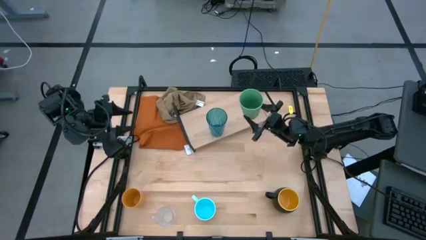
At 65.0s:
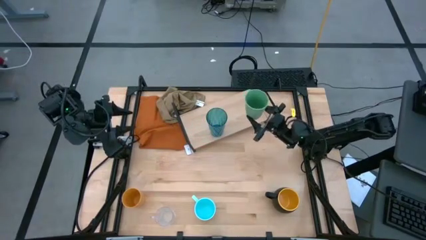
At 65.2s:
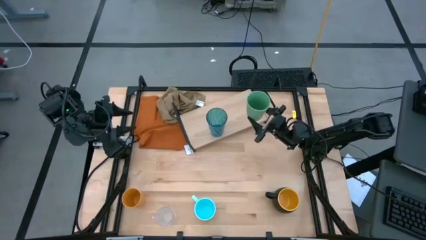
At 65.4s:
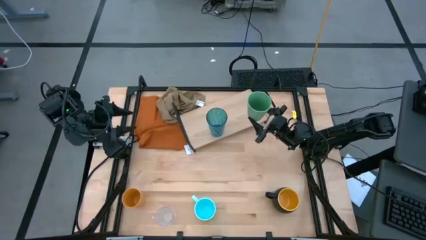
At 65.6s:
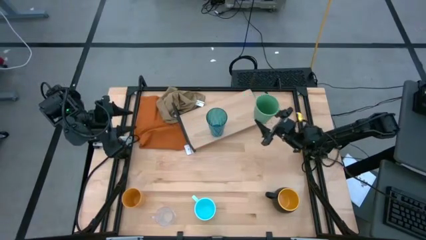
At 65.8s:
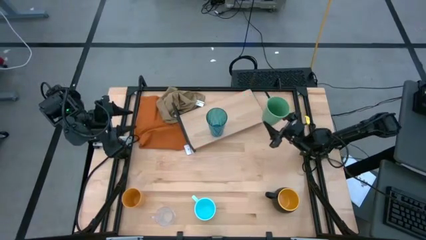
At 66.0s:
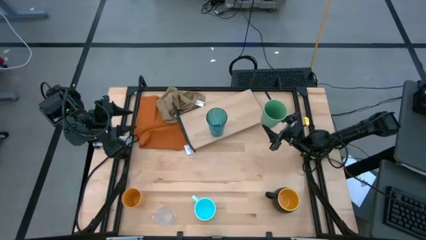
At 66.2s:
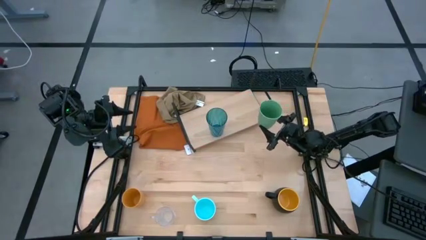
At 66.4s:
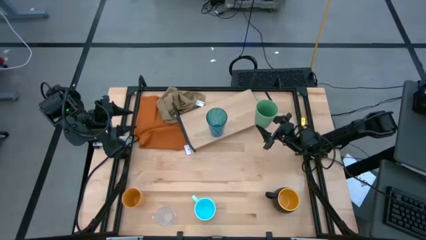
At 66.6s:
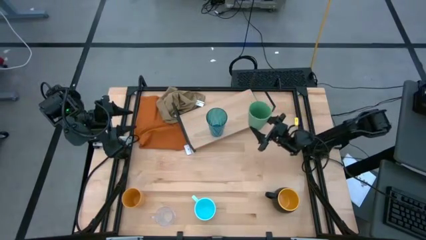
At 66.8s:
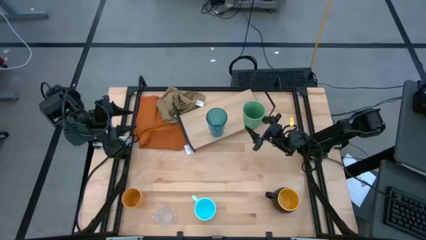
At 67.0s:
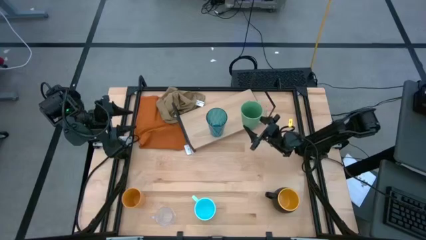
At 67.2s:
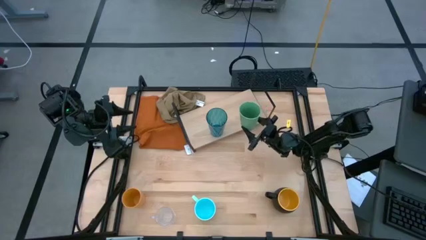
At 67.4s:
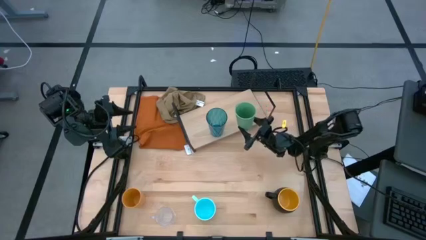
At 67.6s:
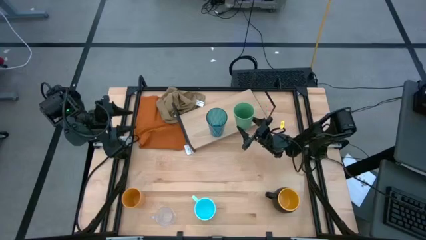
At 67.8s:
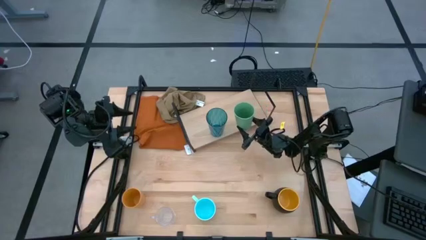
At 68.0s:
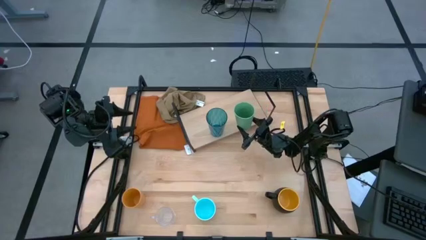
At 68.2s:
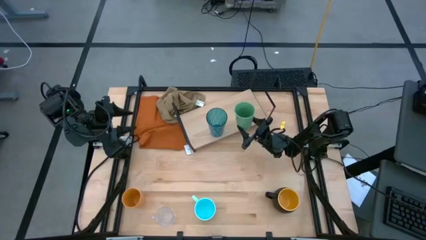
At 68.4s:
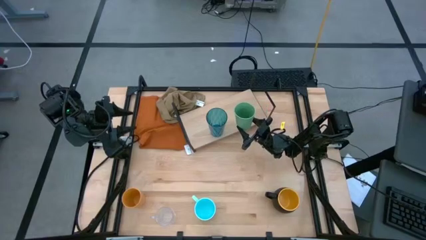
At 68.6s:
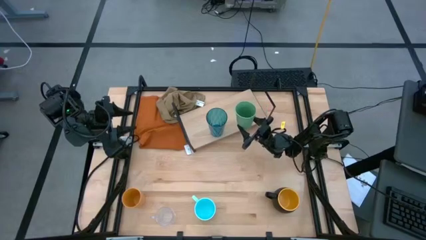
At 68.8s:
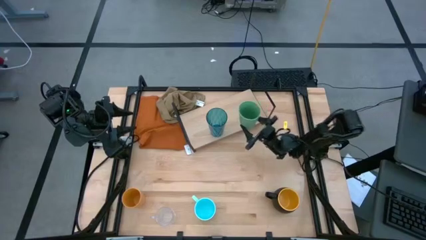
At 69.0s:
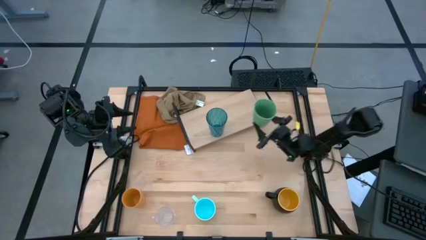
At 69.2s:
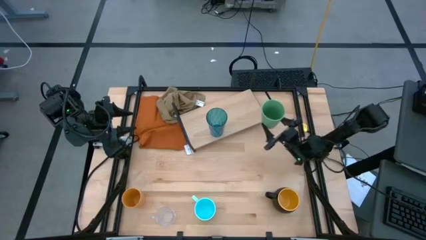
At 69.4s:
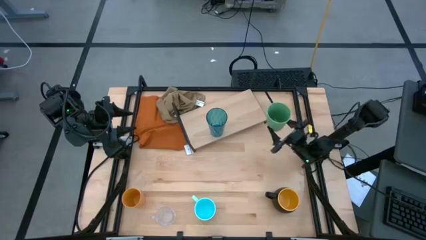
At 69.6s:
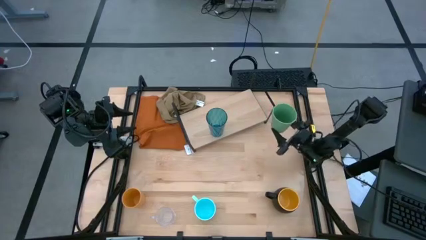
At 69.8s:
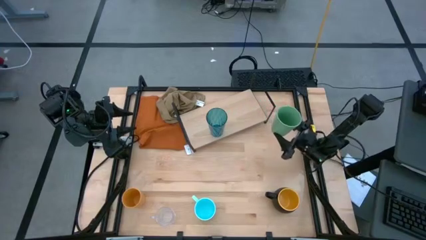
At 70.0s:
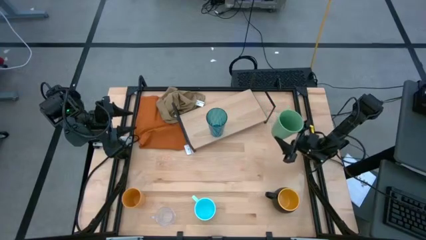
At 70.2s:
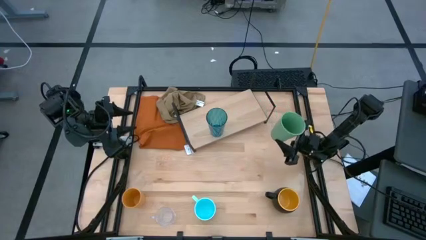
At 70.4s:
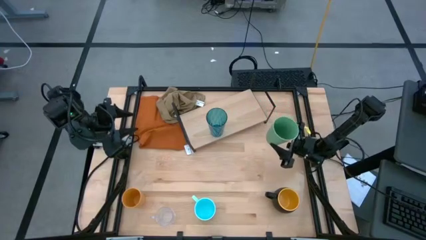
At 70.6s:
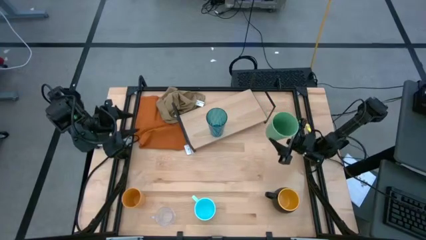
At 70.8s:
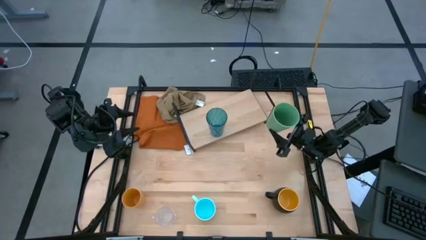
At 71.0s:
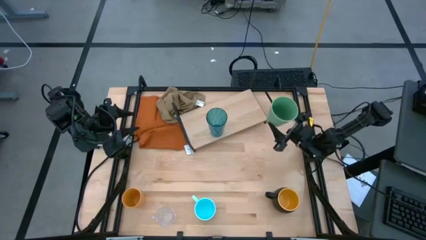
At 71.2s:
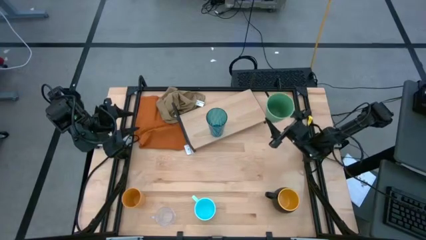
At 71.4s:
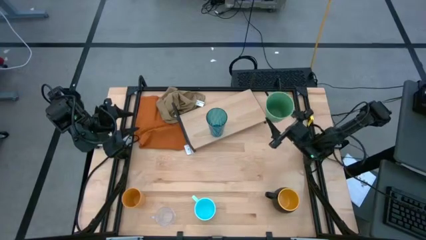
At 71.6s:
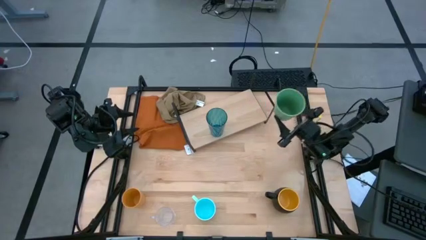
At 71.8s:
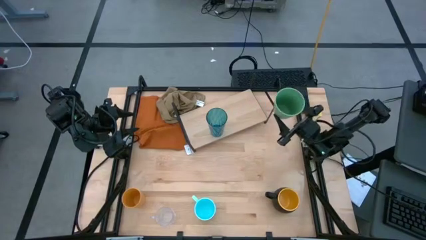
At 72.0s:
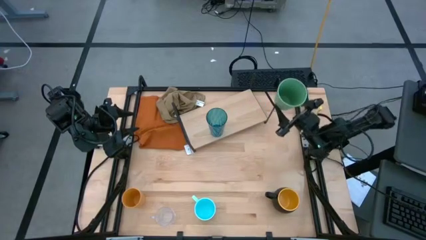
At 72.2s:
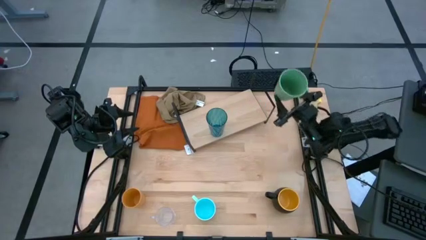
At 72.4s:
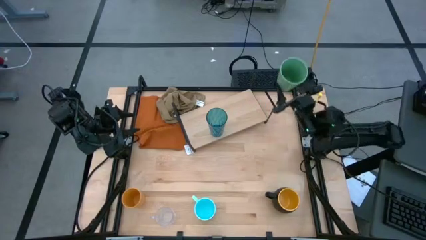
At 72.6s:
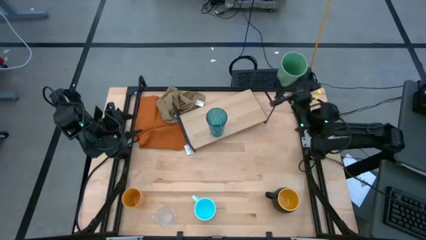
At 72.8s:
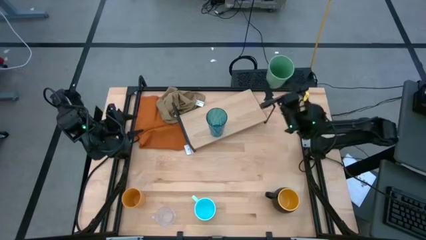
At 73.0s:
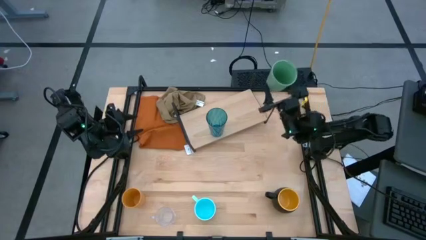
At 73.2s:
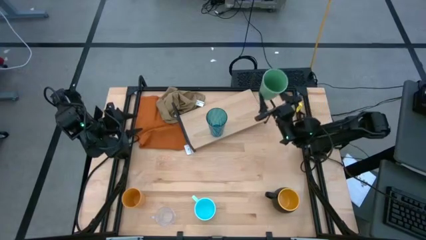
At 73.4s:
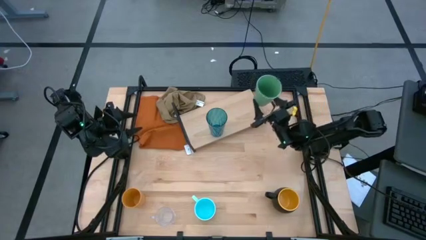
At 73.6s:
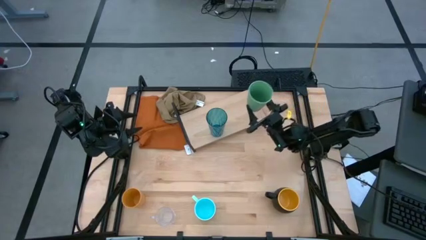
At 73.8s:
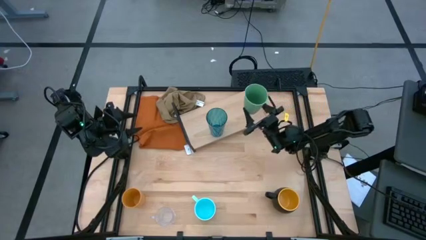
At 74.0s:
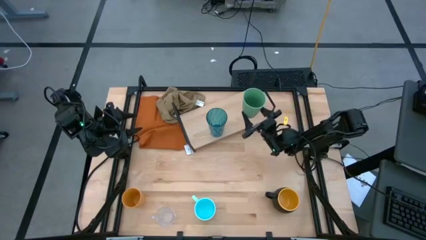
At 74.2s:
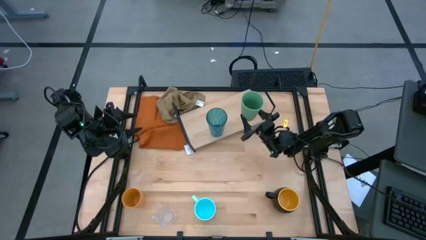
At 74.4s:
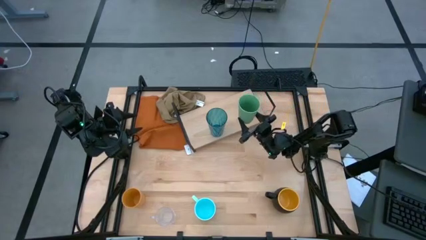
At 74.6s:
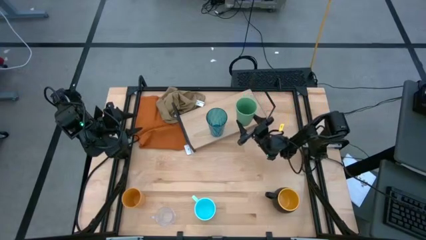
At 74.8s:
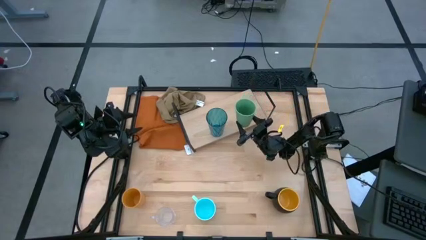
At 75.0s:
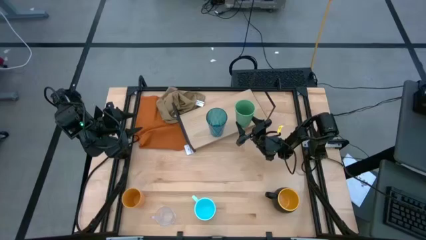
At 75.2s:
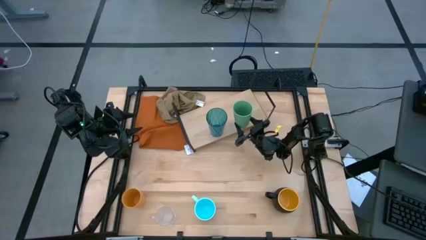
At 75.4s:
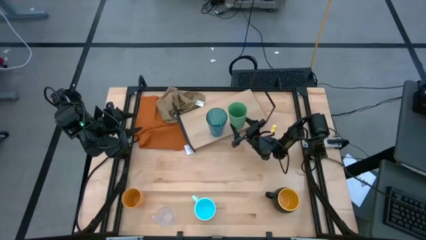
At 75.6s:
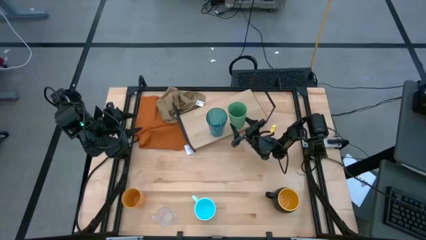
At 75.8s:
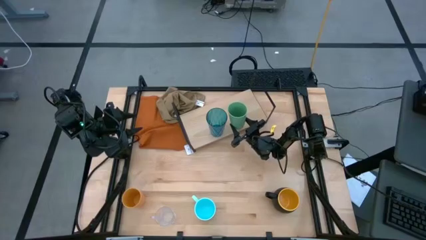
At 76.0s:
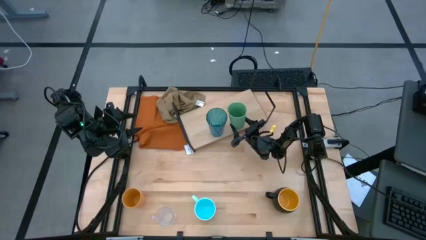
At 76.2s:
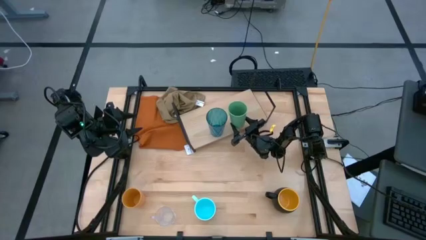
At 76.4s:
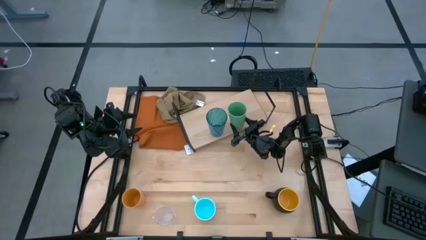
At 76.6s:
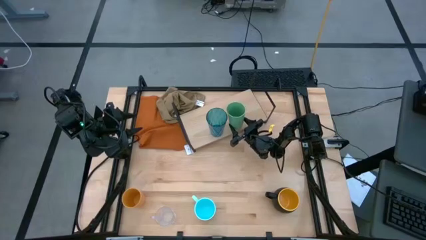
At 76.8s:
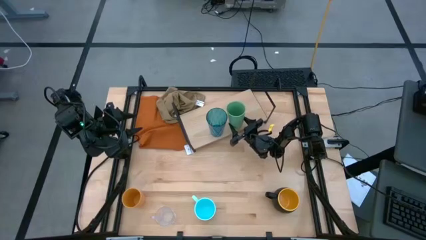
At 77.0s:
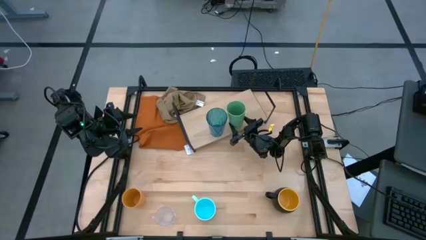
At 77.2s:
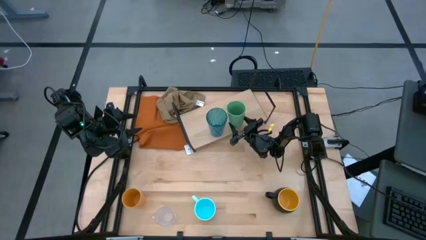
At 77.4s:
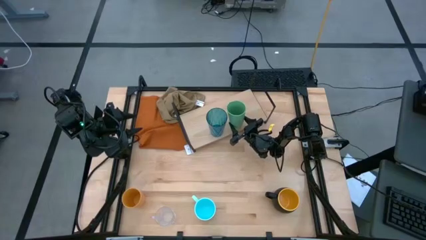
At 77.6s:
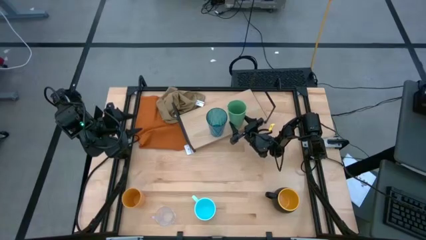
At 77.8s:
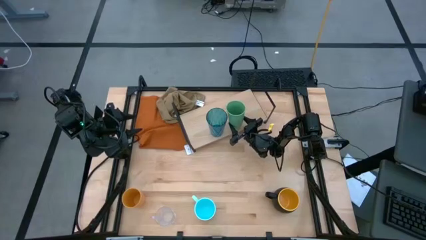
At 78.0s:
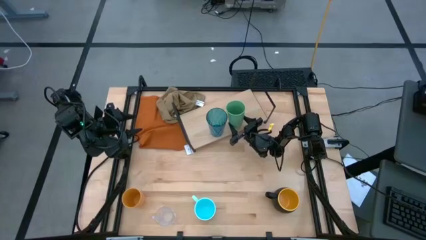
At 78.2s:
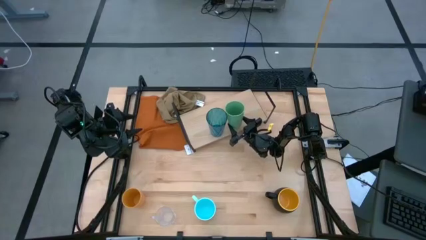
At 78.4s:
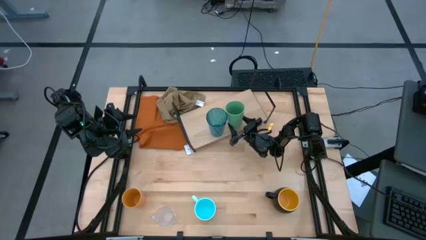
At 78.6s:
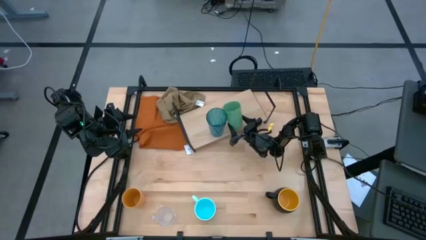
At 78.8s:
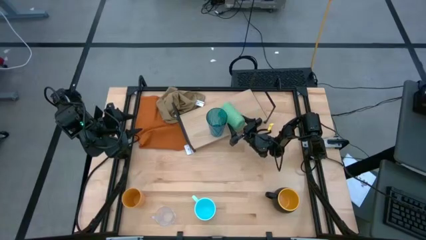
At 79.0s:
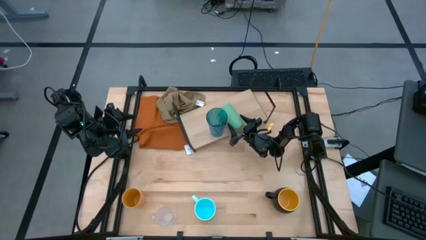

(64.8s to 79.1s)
Task: Stack small to large cups/mugs on shelf
Put the green cup on the shelf
